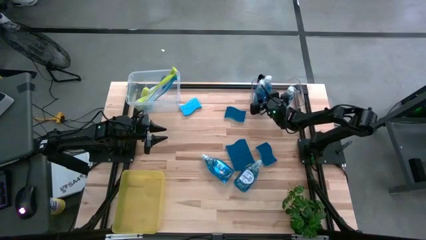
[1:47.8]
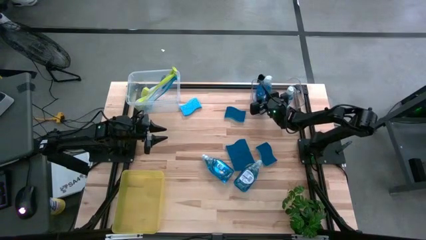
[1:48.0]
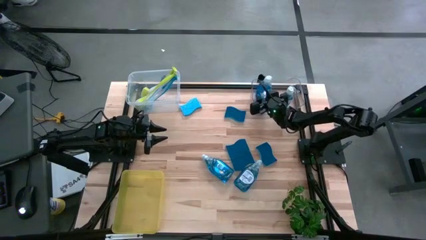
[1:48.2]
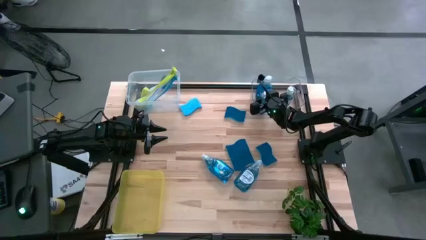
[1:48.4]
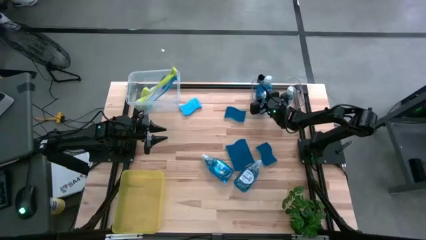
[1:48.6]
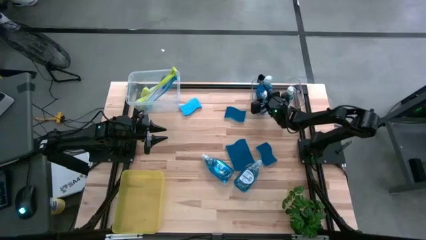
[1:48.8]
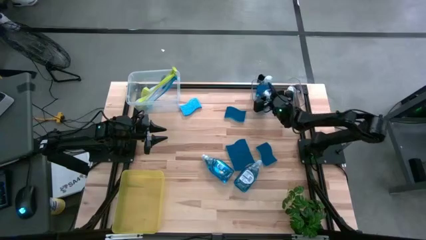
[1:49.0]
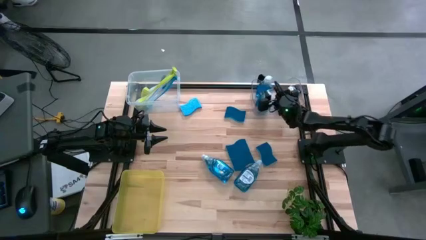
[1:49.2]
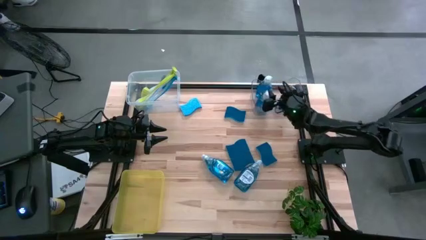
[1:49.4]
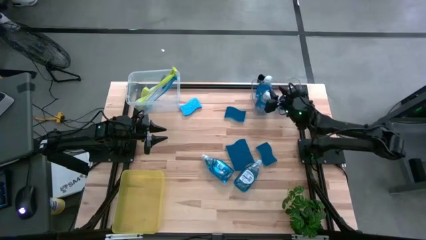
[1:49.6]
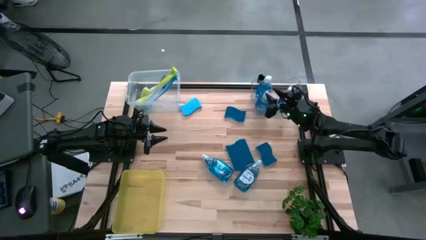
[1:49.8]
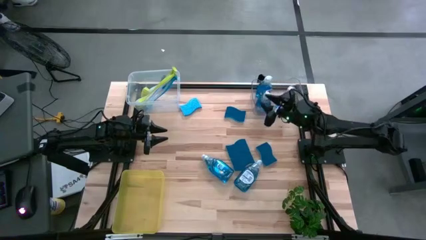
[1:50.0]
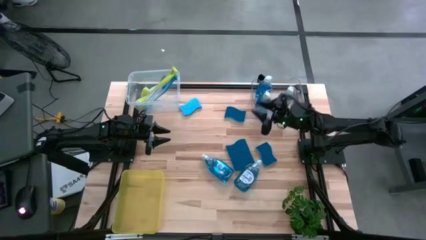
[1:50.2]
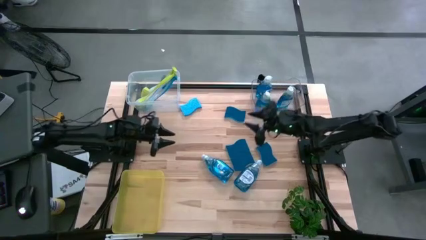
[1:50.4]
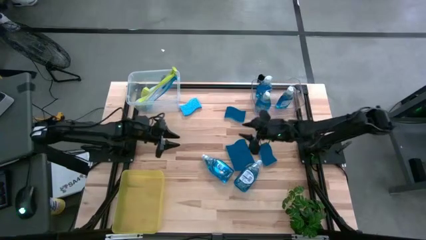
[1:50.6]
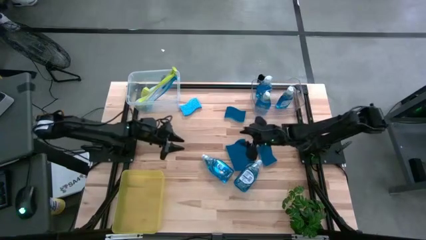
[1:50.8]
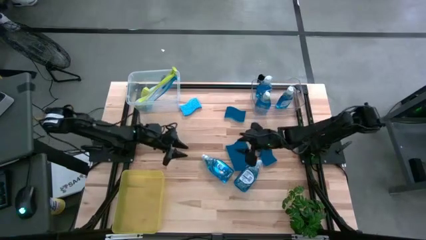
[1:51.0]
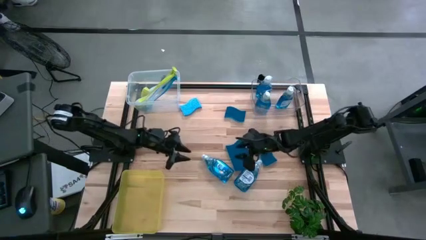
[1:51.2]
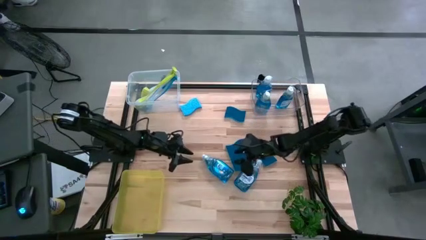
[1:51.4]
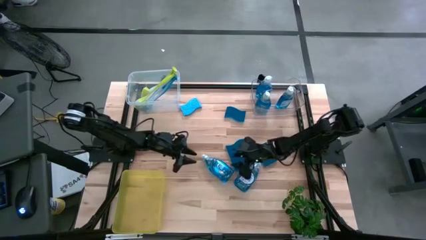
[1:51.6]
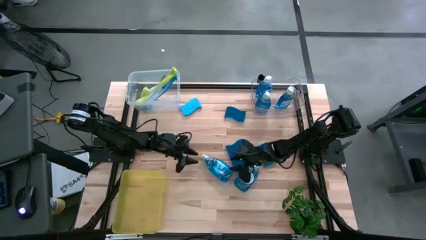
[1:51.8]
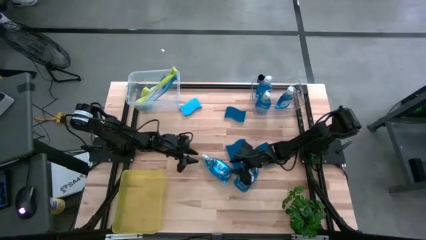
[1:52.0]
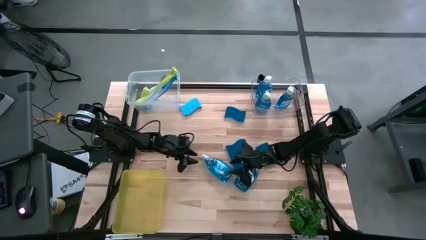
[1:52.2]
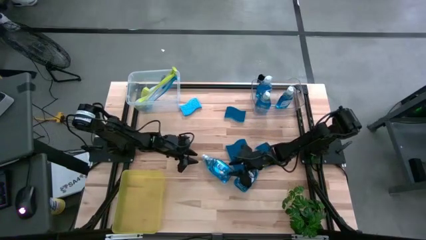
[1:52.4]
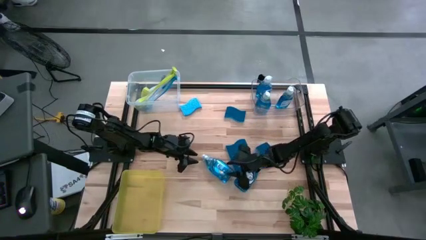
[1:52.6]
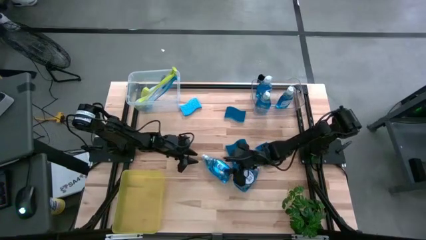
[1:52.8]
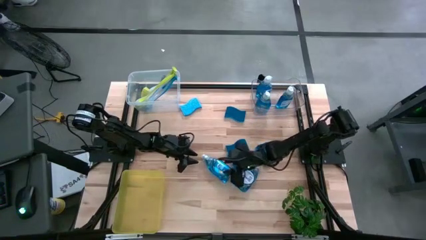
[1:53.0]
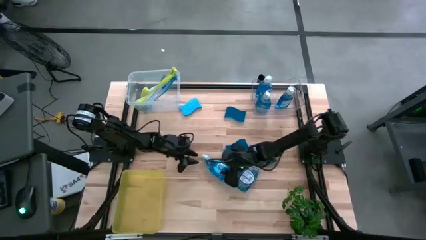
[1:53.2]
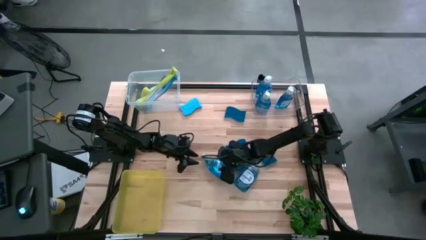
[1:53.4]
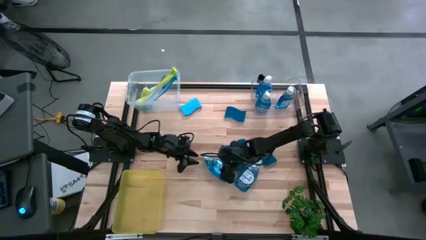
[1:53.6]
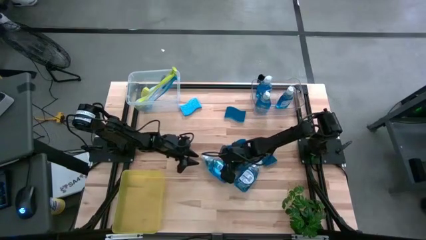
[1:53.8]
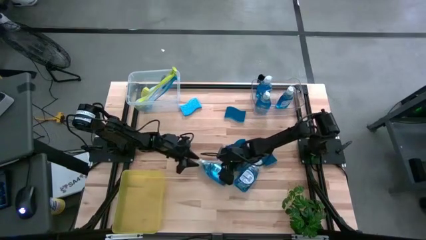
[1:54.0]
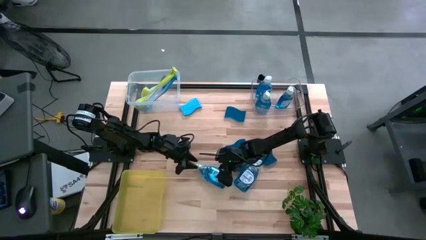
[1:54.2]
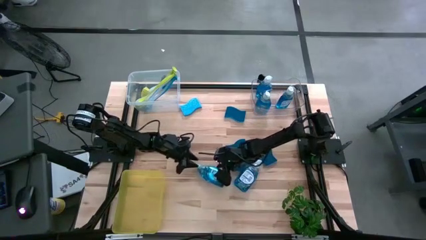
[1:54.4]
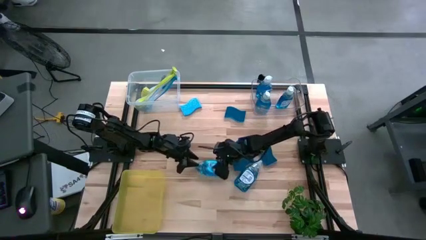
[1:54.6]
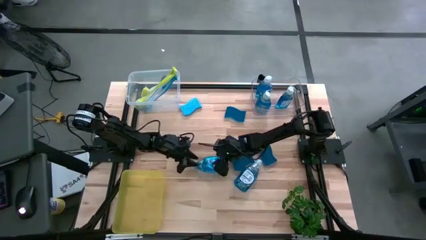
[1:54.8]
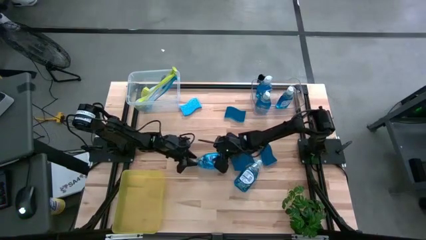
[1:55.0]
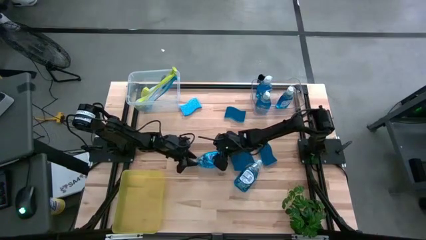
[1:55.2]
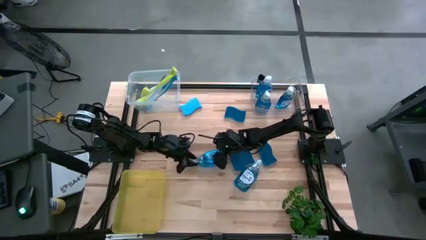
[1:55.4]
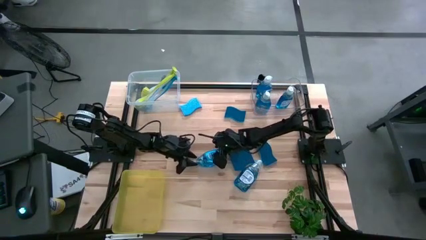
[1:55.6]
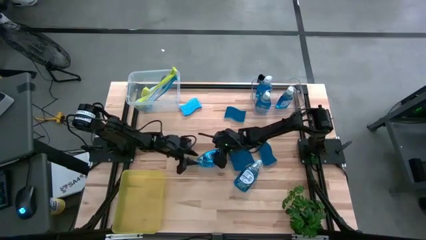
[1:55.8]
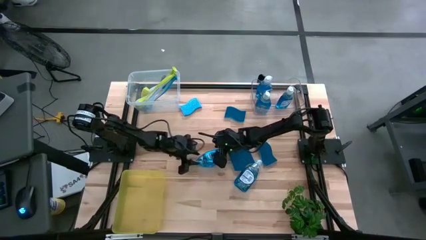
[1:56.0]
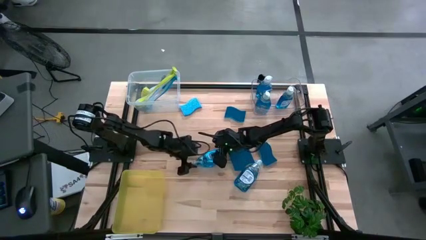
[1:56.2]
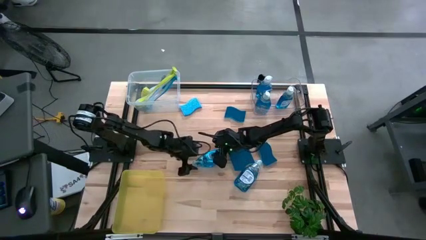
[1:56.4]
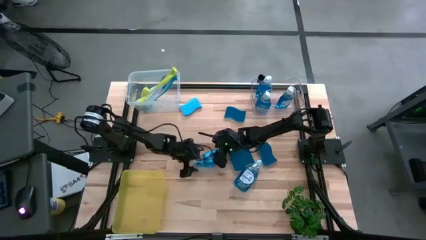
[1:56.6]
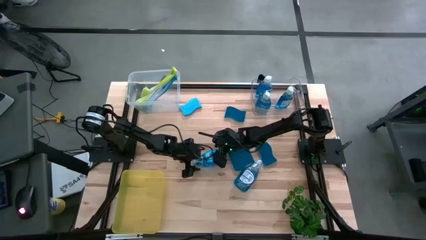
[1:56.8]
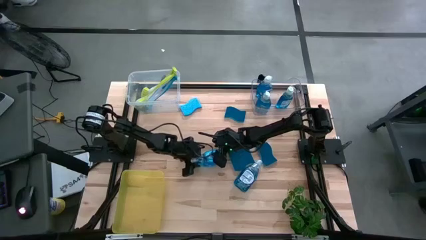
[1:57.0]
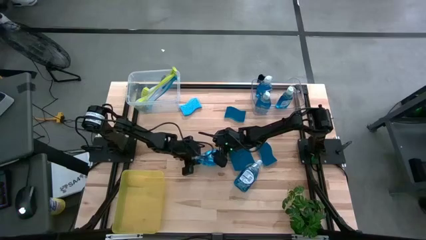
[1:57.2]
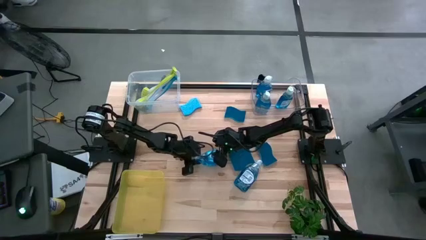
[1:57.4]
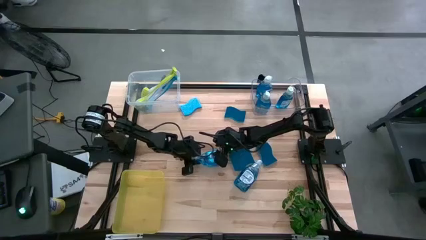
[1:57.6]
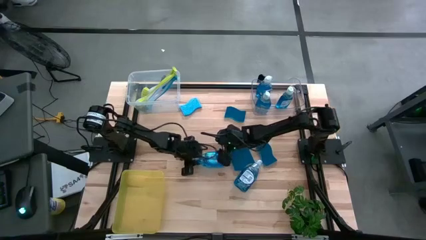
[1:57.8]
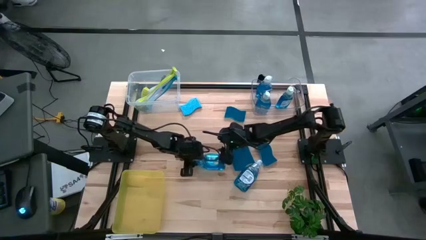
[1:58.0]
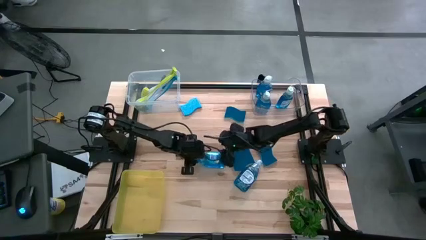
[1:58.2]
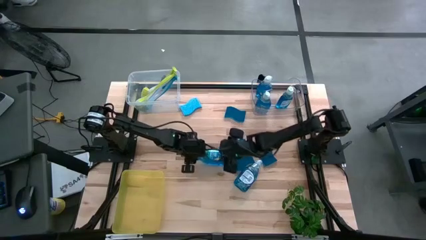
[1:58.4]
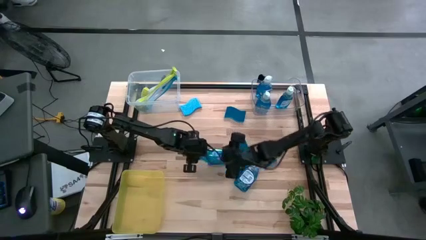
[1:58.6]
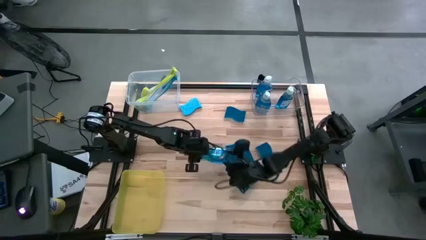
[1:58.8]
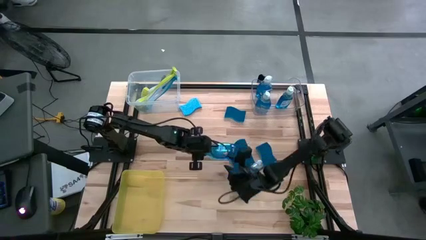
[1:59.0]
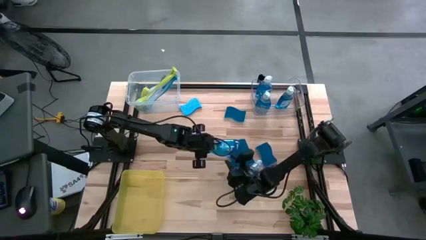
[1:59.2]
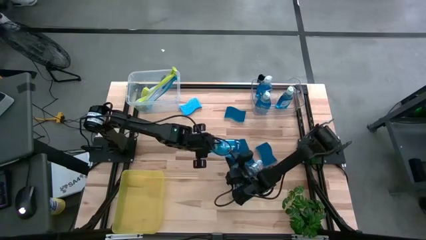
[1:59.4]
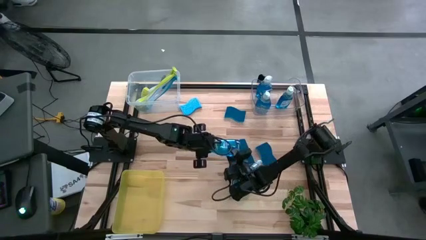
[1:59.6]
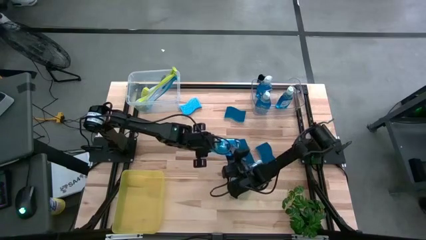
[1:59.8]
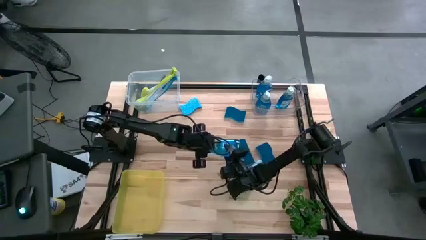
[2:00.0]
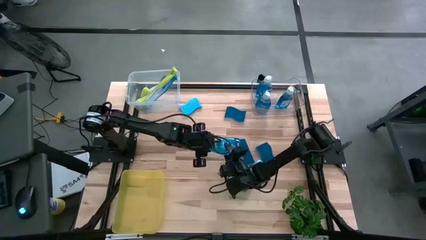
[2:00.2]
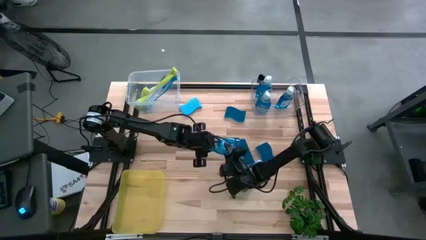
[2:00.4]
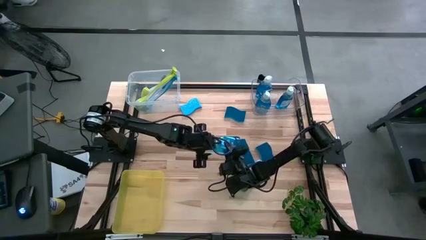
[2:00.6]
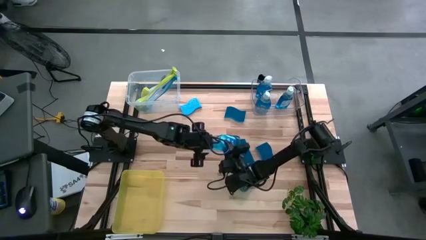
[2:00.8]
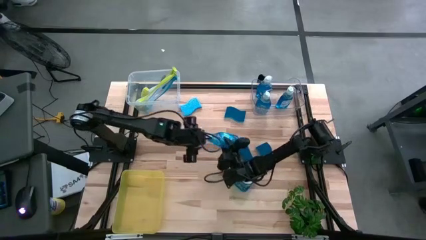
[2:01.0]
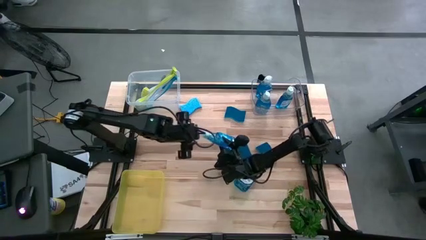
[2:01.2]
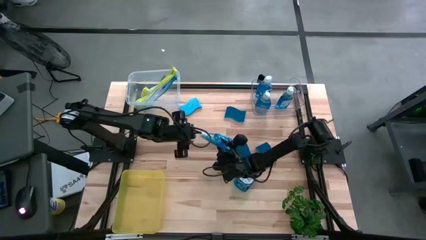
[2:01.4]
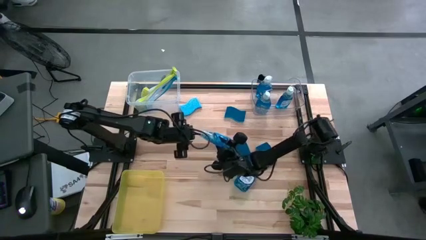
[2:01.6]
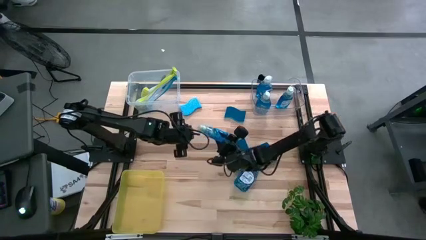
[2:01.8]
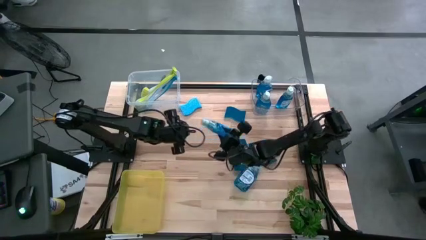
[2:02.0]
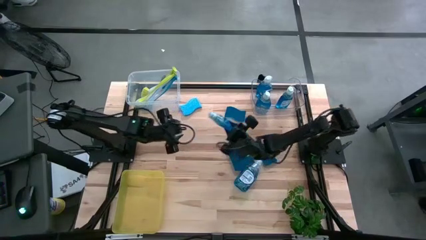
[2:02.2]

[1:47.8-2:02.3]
Task: Pick & Place Kitchen Sink Supplies
Put the left soap dispenser into the transparent bin

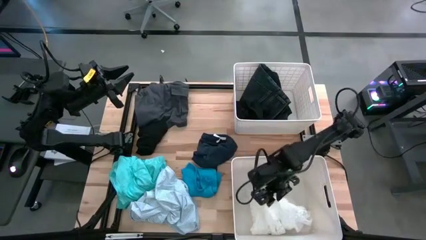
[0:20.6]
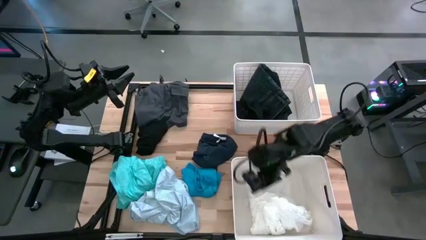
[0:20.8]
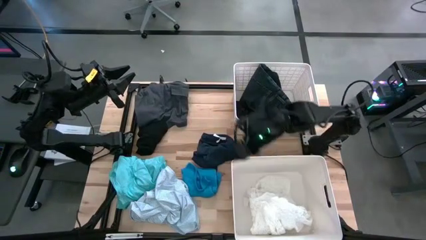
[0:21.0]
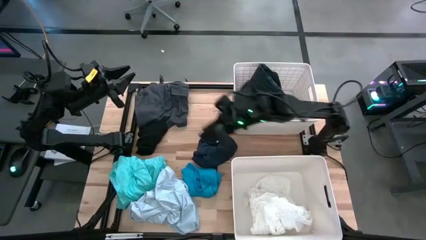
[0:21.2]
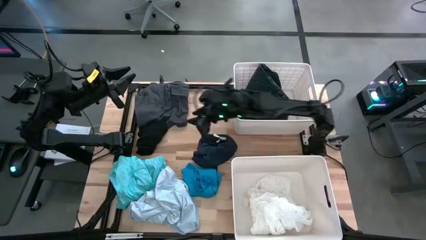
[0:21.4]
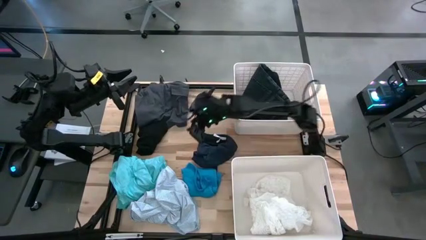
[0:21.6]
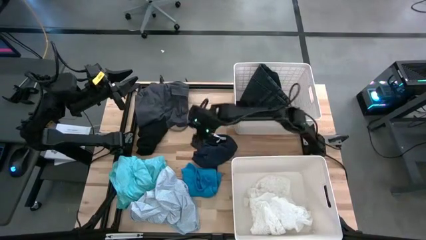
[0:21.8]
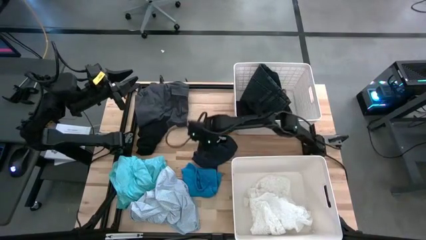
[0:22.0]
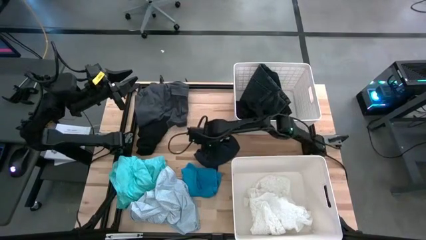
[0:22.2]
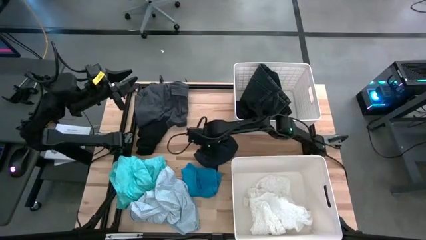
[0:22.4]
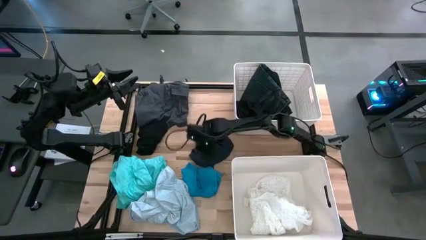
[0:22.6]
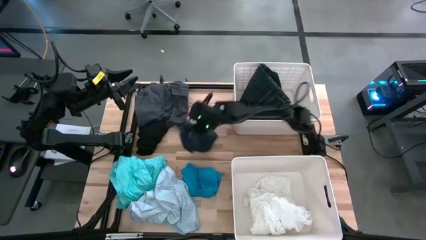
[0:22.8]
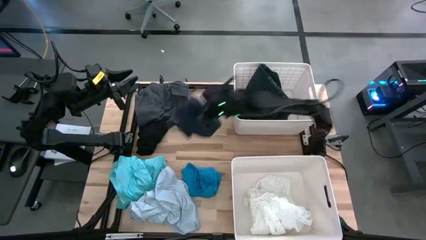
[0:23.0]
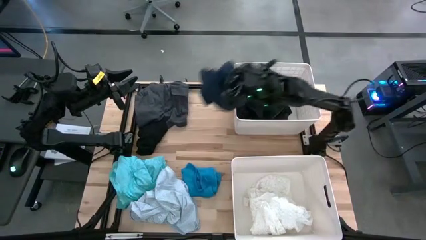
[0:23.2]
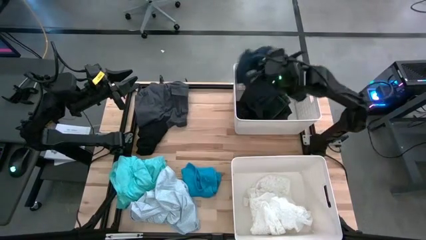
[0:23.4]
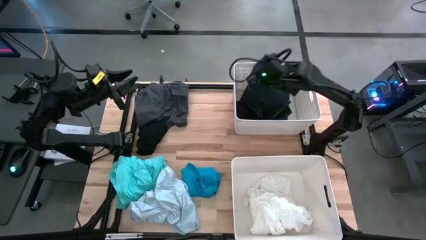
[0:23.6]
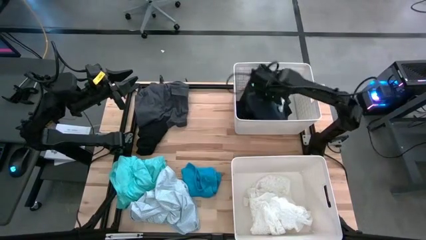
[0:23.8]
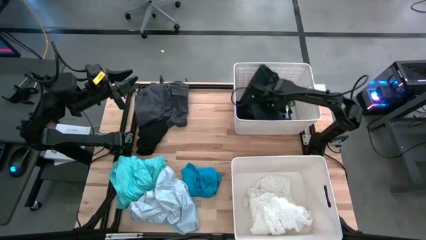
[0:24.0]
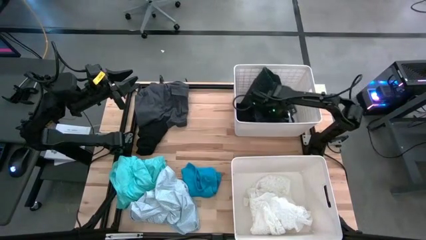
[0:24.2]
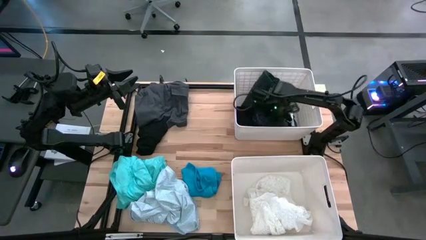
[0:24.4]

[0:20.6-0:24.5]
Task: Sort clothes
Put the dark blue pants into the top white laundry bin
